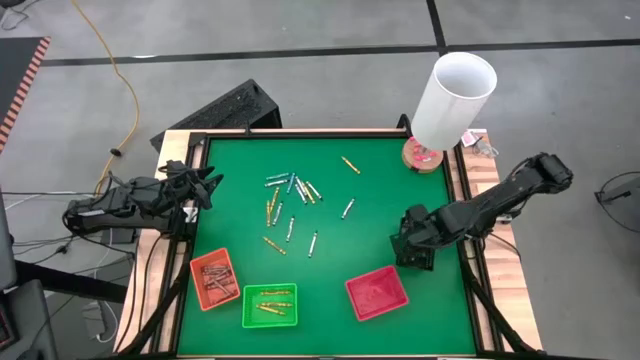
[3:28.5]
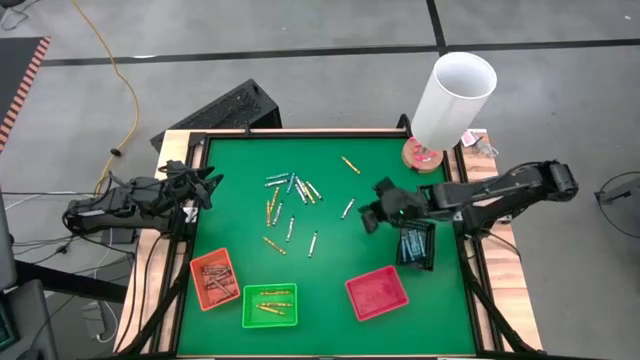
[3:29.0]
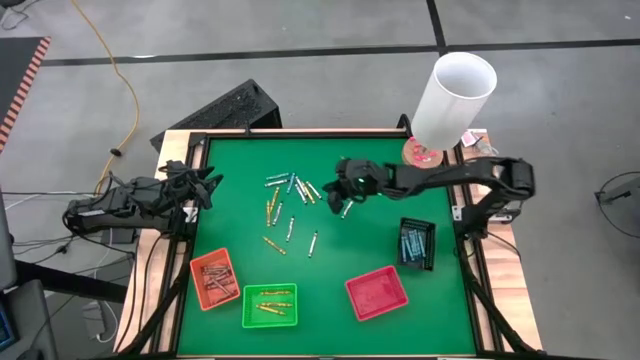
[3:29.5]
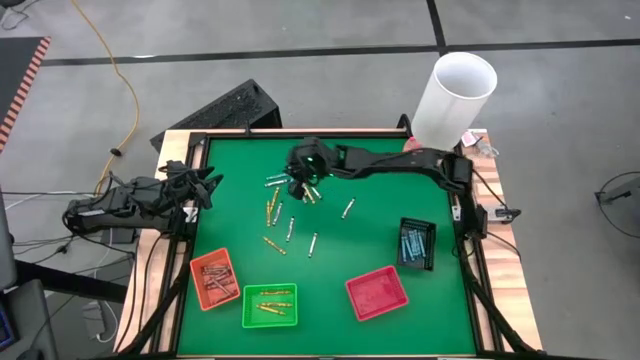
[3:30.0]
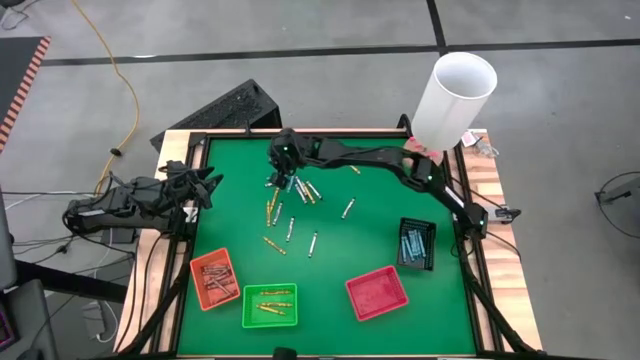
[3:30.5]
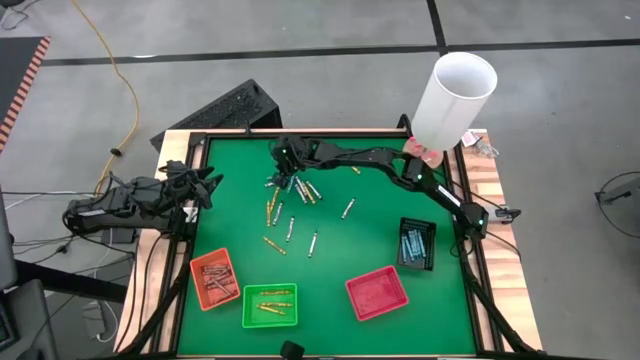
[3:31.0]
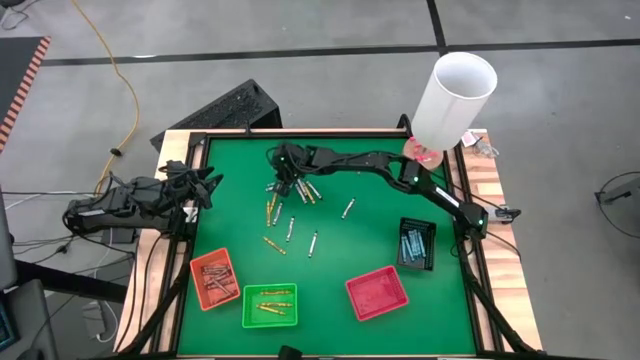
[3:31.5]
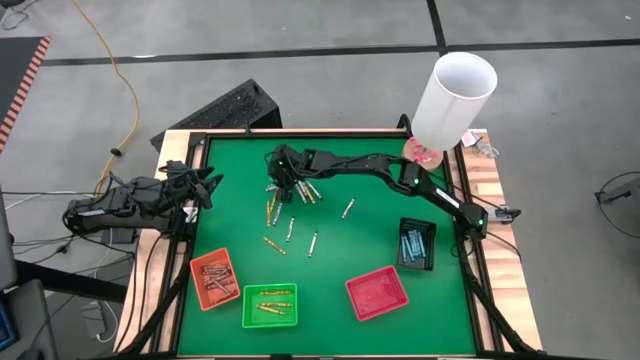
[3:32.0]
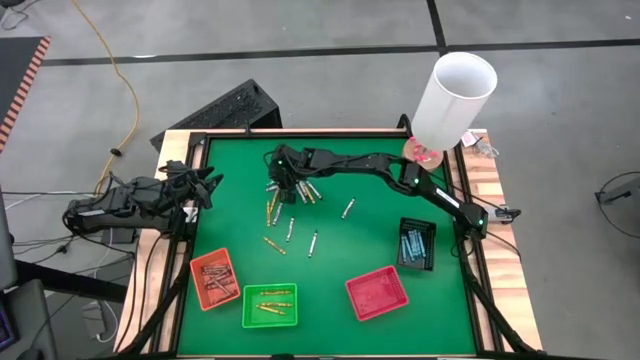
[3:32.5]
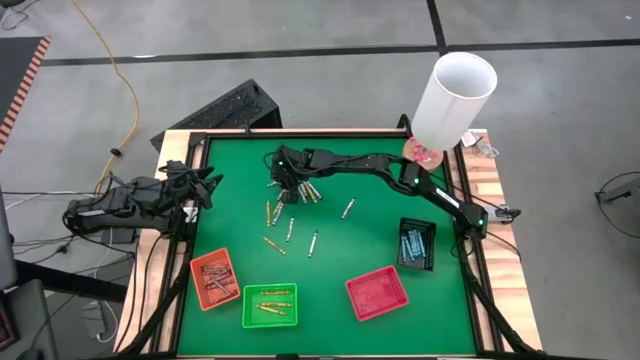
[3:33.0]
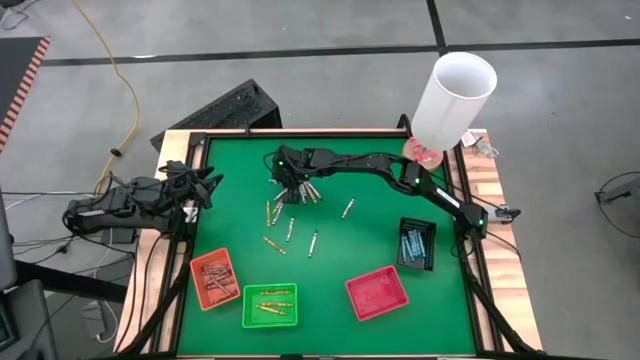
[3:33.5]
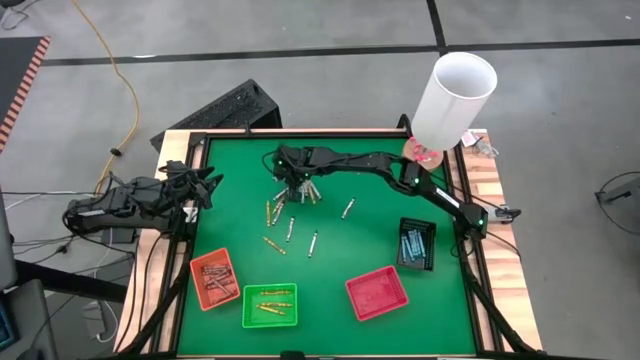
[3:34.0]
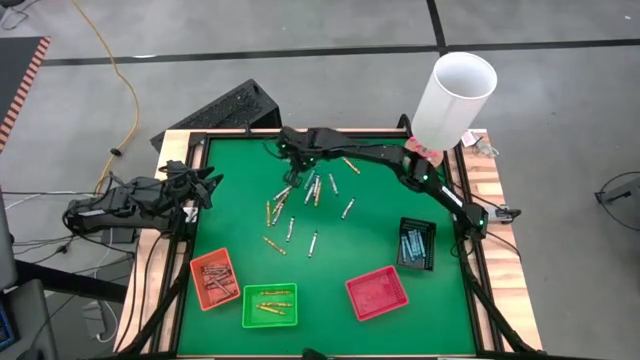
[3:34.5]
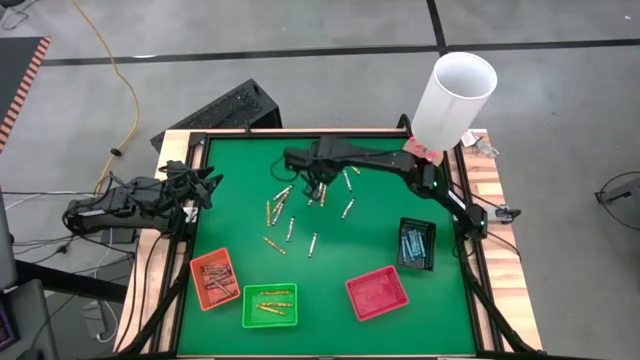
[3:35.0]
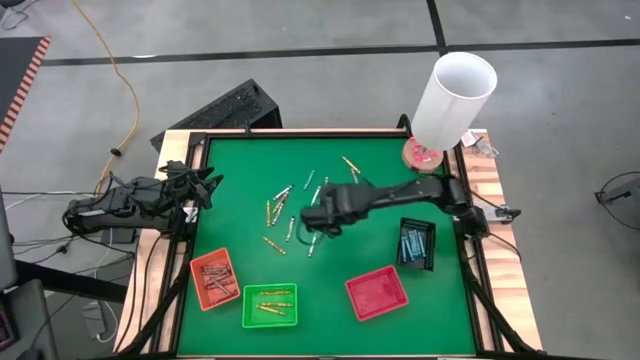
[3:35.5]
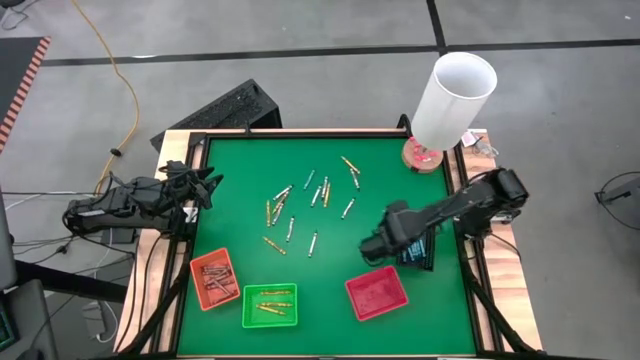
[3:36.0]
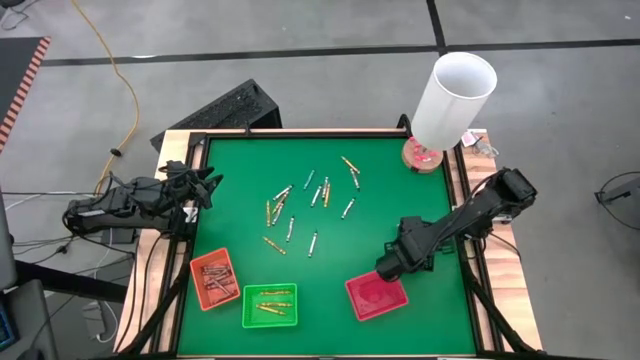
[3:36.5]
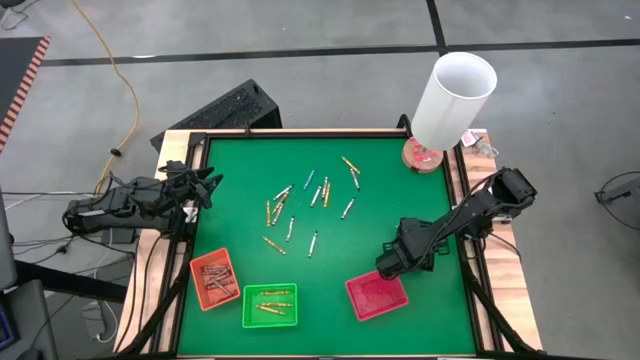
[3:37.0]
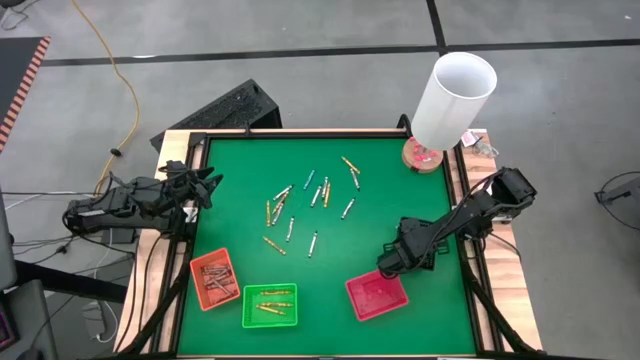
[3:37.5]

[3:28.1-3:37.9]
Task: Sort crayons
Put the blue crayon into the black bin

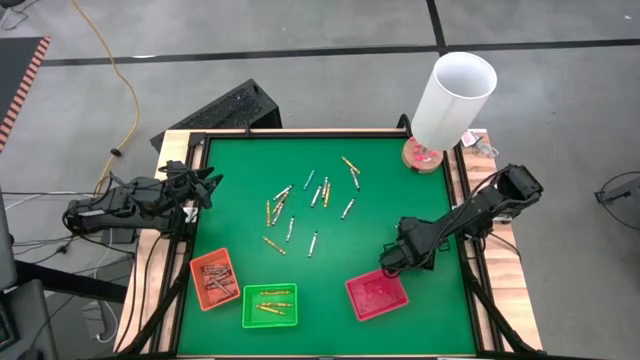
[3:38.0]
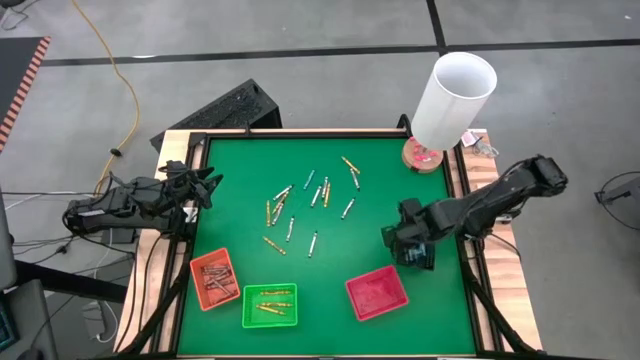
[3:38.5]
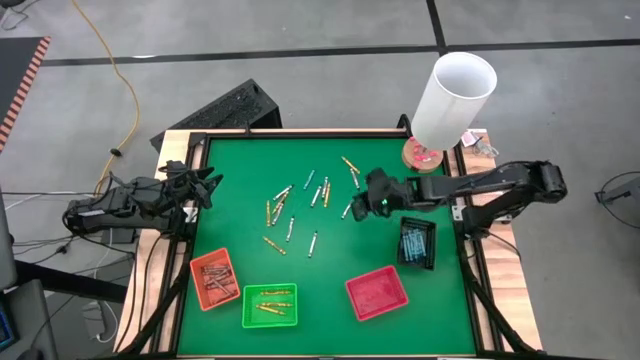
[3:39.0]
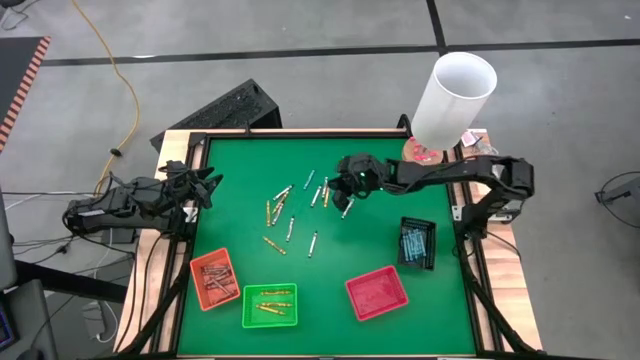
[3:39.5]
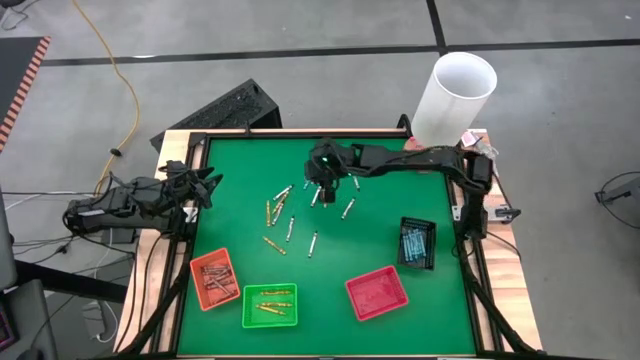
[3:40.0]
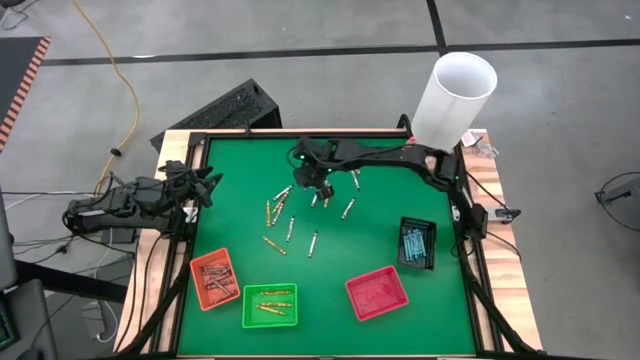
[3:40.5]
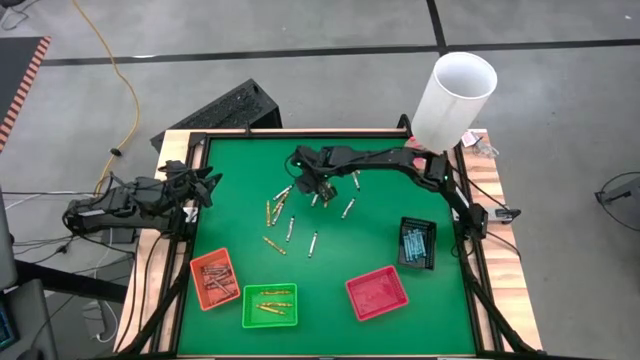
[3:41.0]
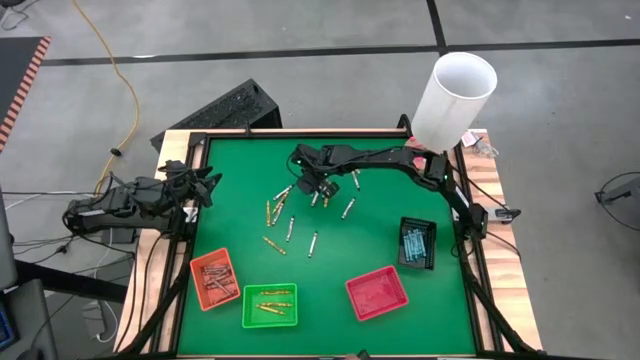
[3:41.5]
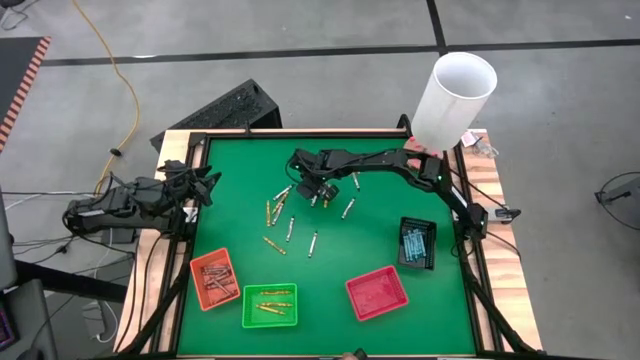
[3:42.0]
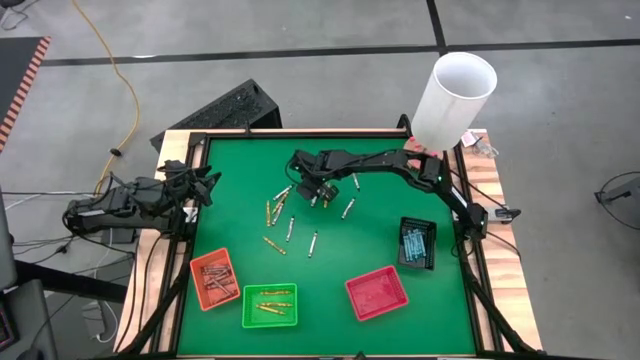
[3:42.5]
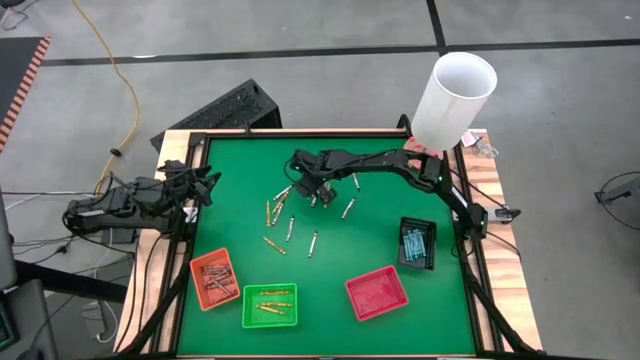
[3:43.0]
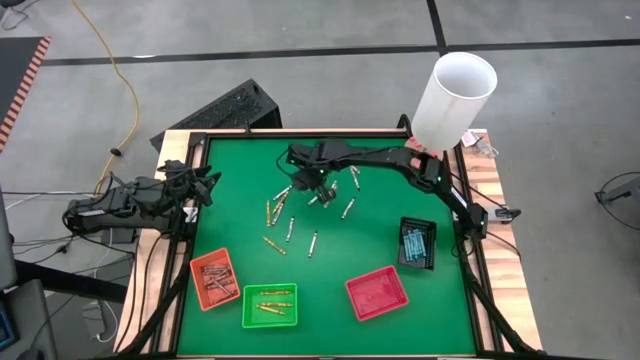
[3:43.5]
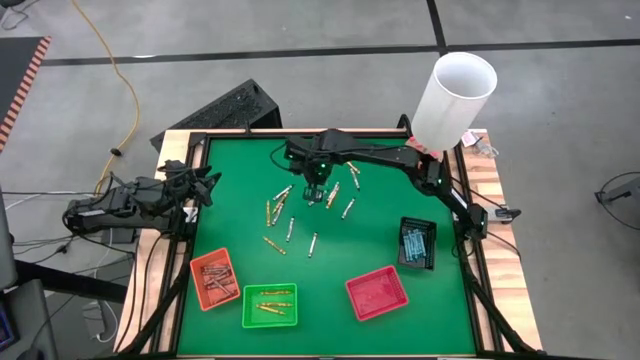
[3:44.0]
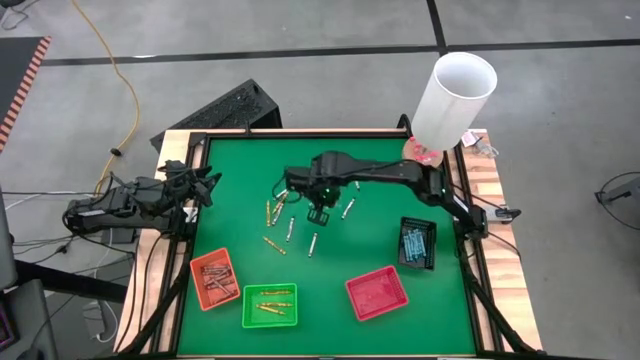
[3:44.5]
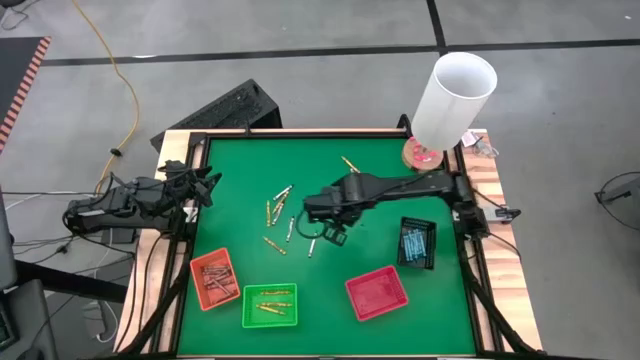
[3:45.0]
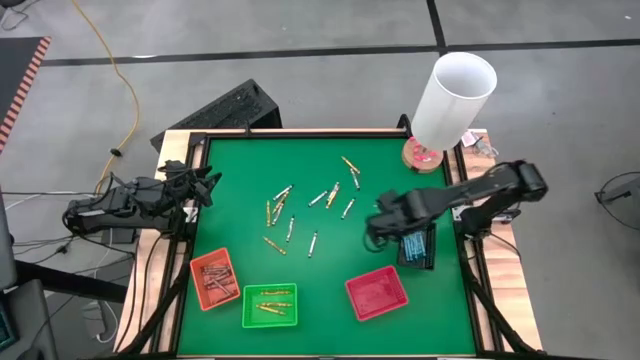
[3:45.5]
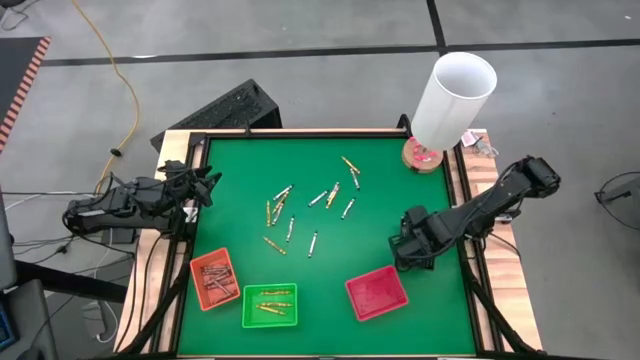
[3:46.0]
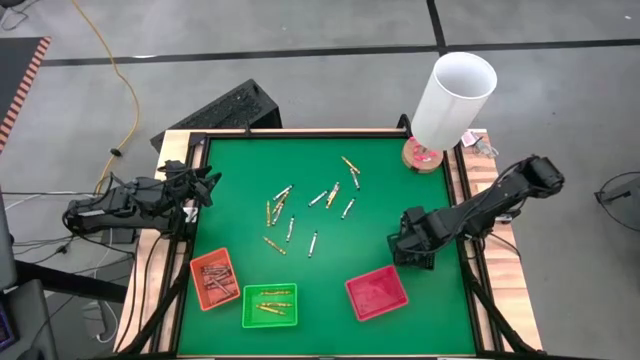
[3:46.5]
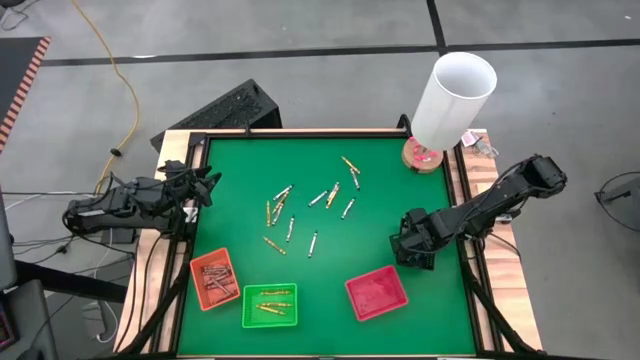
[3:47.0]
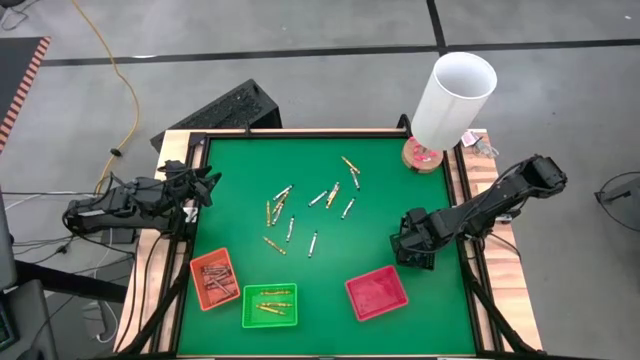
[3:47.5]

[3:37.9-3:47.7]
Put the blue crayon into the black bin

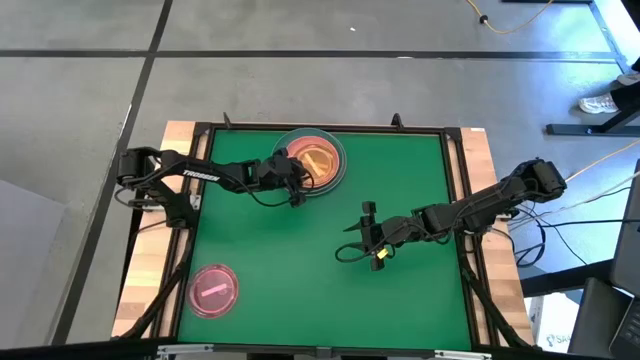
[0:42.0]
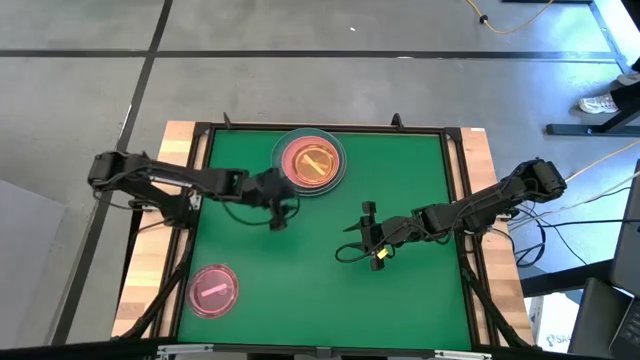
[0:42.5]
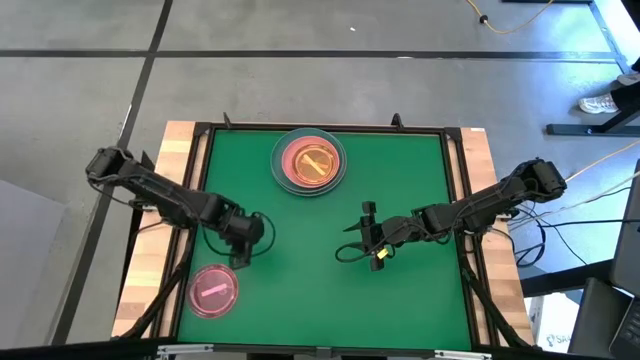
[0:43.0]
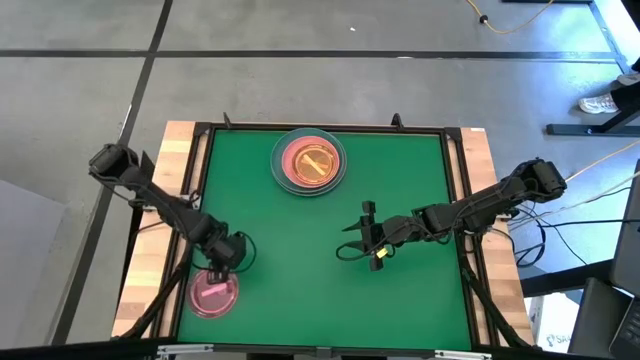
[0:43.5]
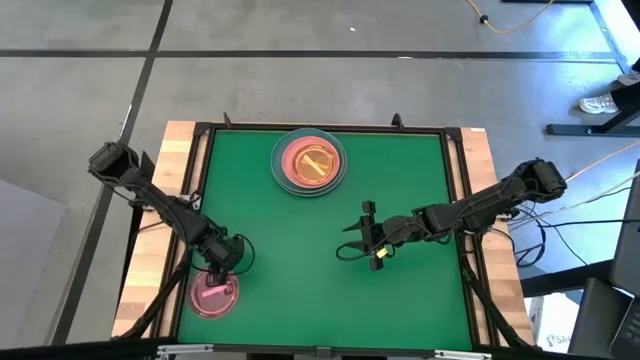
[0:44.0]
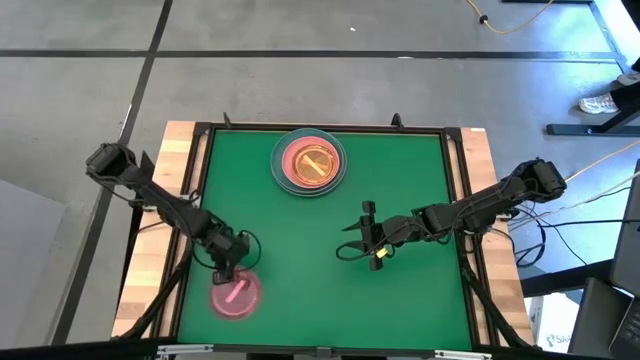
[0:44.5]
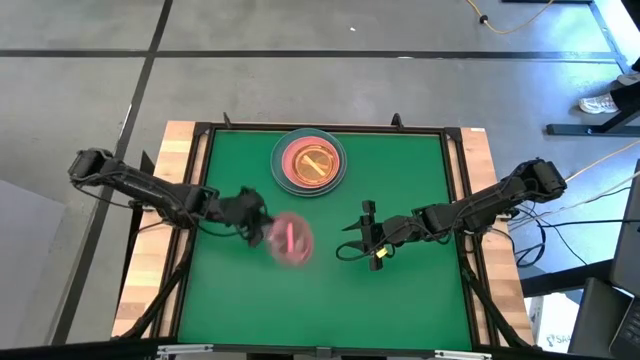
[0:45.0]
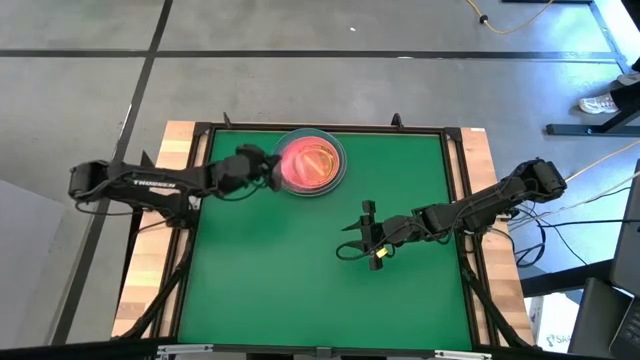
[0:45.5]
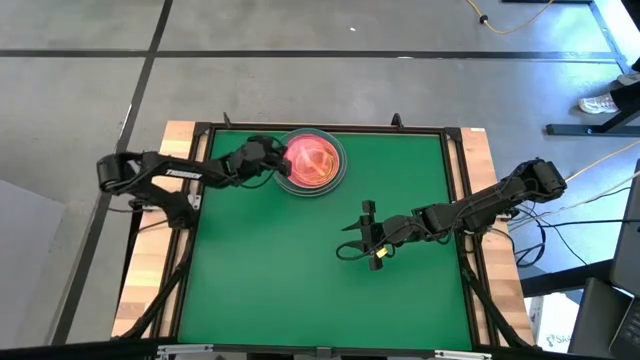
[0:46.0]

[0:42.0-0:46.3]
Task: Stack plastic plates
Stack the pink plate on top of the orange plate
